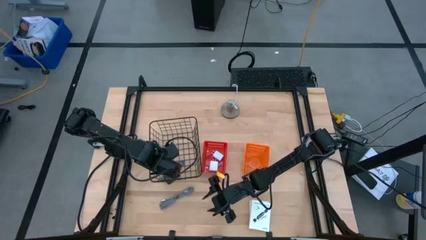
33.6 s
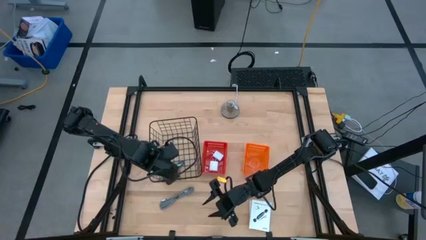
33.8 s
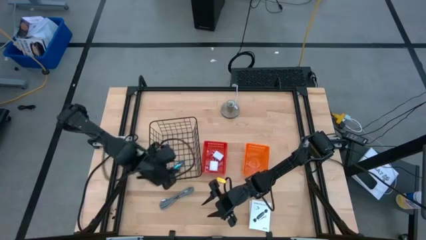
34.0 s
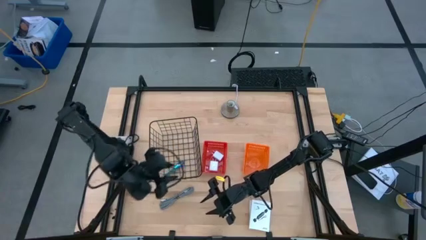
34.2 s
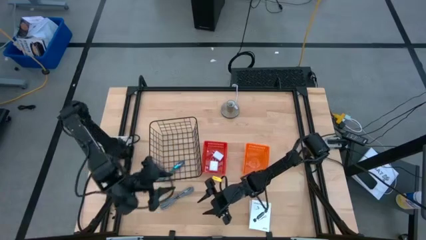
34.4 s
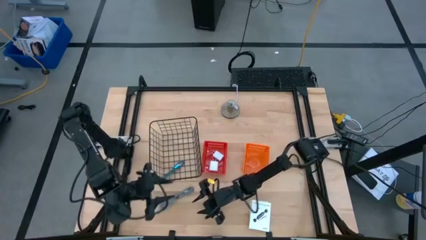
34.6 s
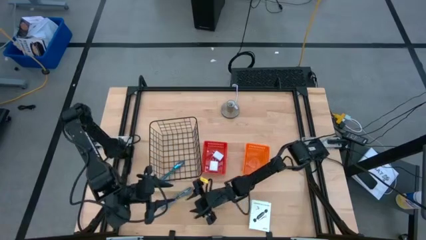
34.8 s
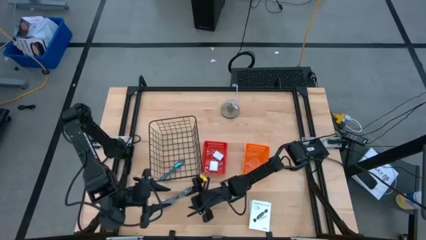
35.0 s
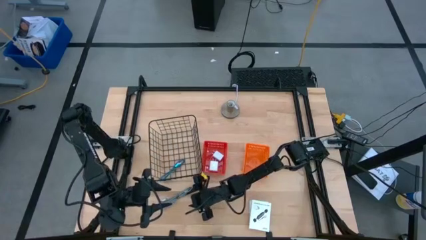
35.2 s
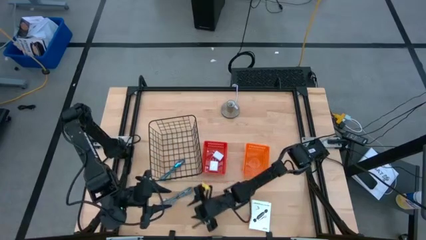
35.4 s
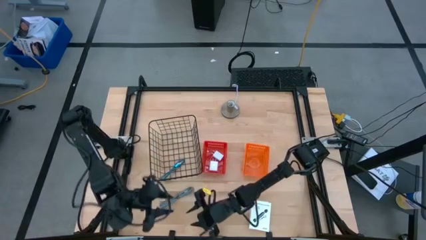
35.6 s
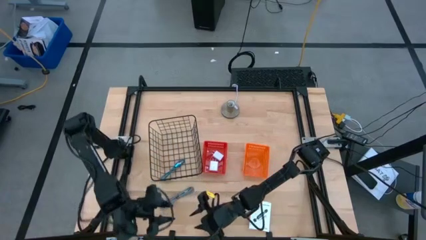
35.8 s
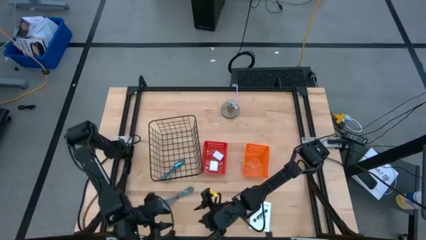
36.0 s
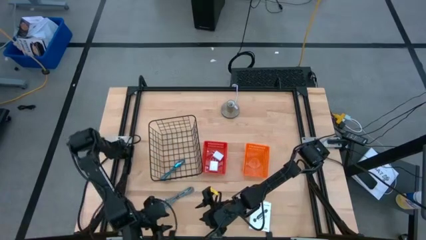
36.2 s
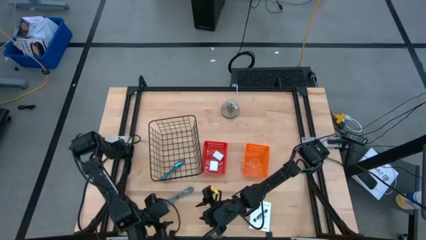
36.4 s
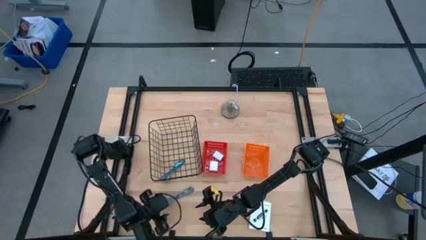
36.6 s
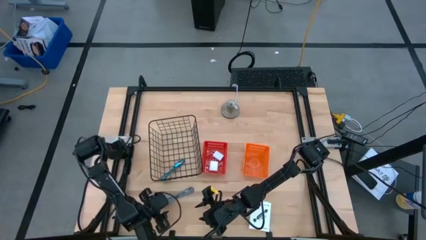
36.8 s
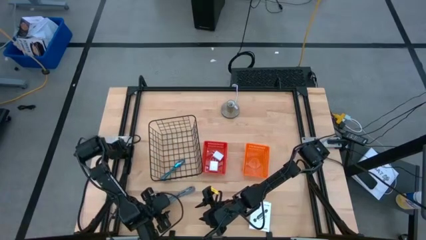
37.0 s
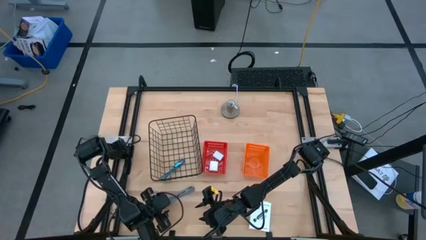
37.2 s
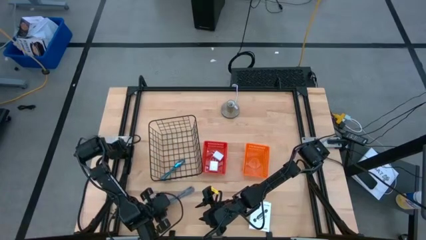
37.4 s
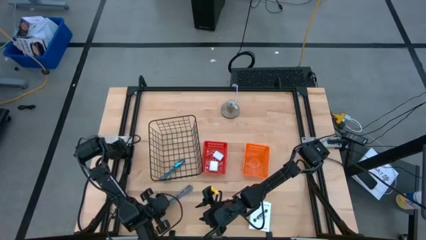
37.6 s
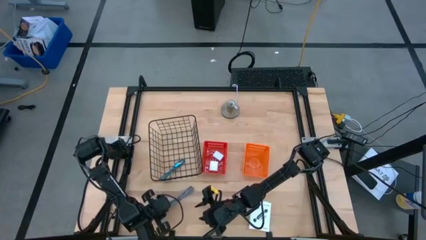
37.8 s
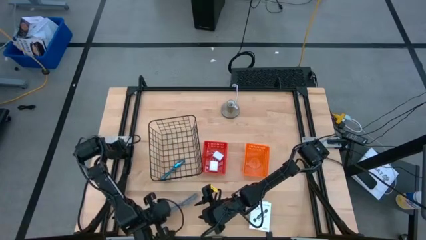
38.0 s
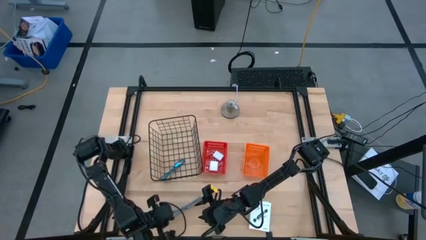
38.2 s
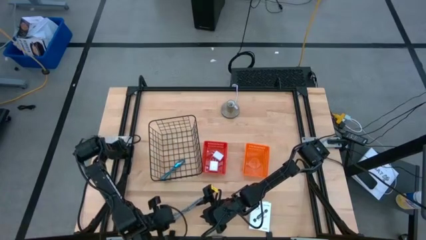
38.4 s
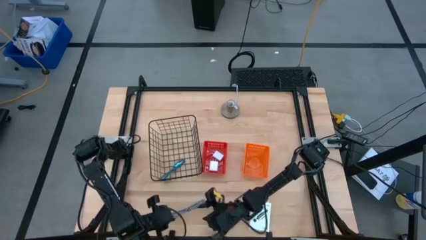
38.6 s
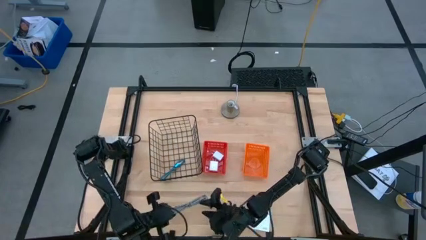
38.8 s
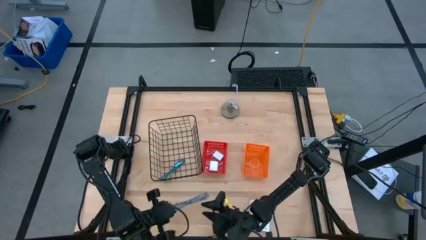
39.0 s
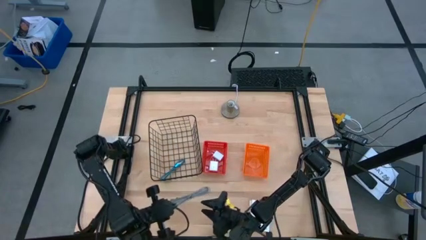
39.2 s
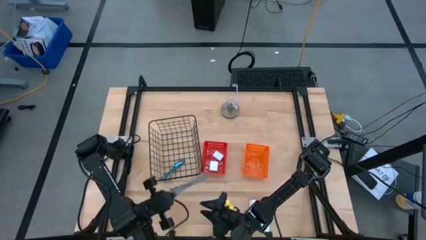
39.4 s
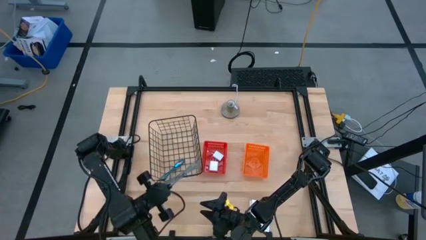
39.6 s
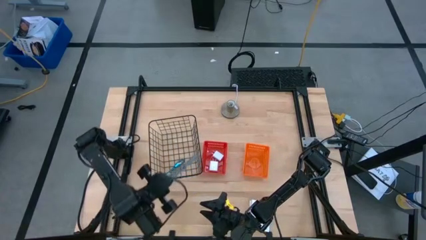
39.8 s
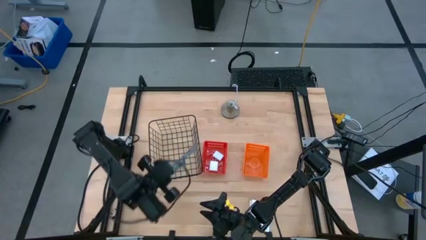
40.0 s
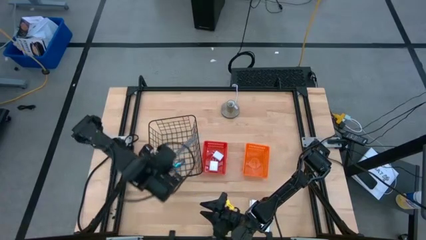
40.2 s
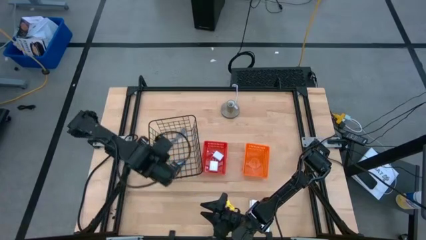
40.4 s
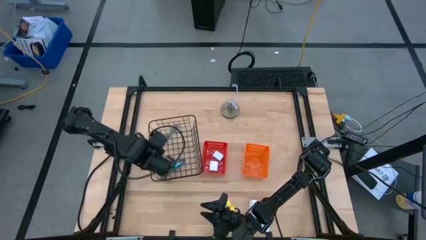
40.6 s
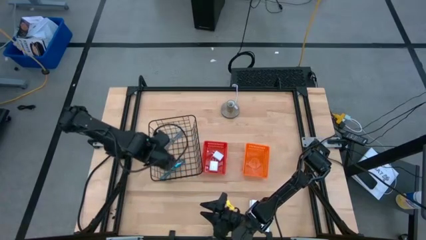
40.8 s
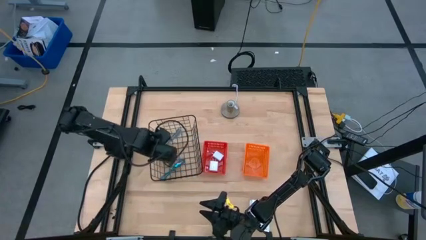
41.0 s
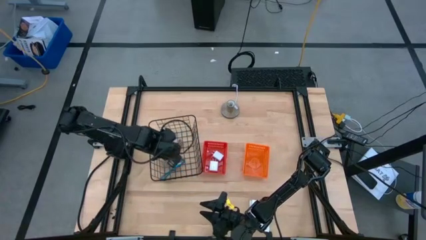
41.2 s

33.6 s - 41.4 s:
Task: Pick and place items into bin
Put the white charger cable into the black wire basket

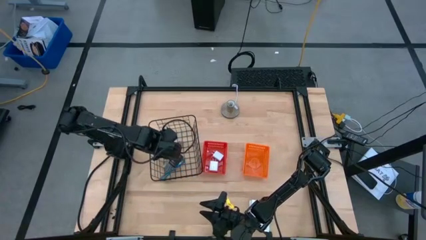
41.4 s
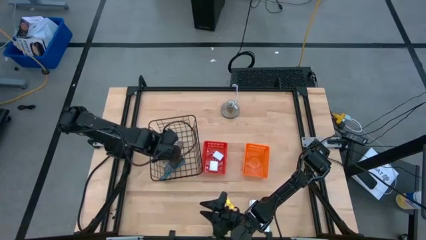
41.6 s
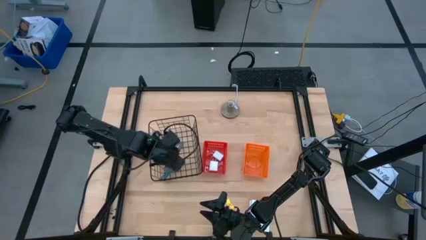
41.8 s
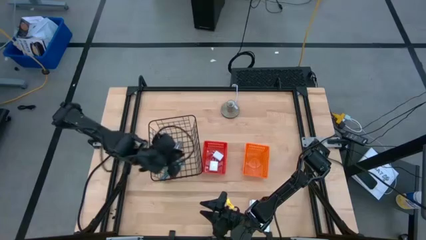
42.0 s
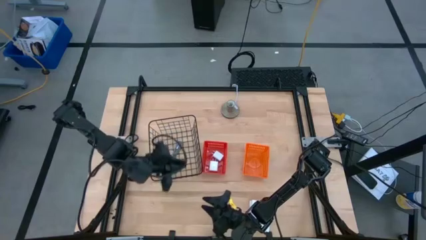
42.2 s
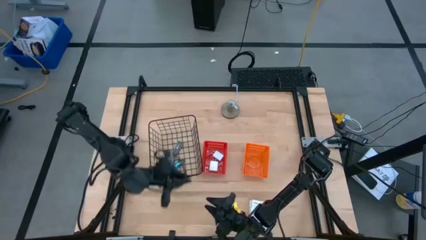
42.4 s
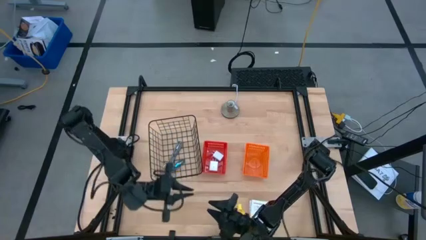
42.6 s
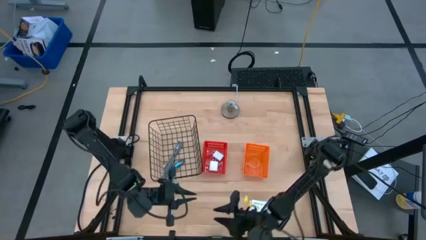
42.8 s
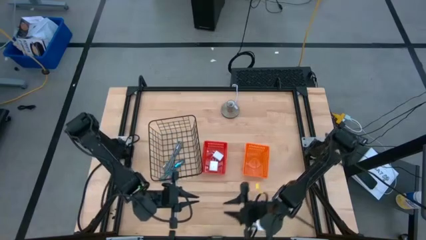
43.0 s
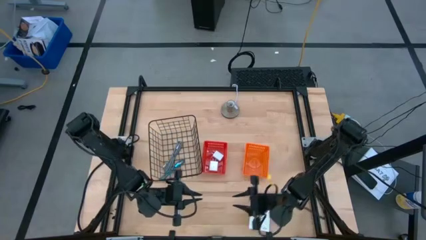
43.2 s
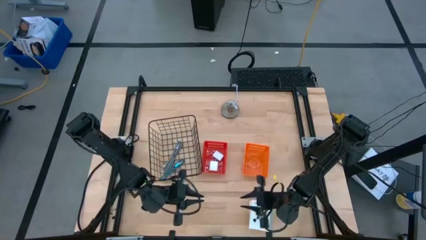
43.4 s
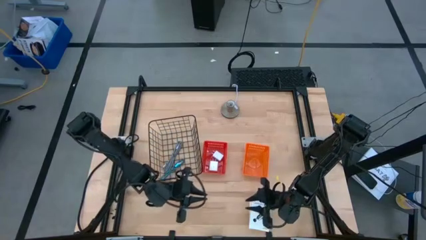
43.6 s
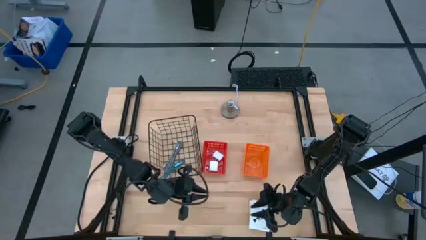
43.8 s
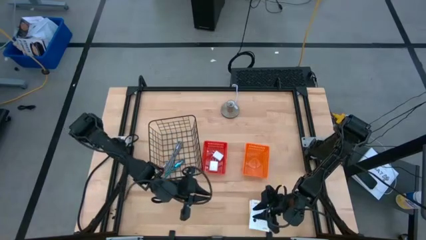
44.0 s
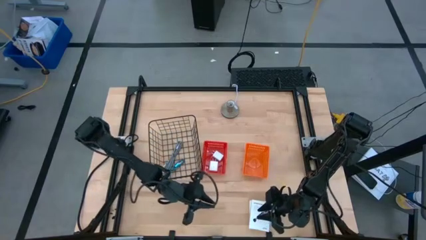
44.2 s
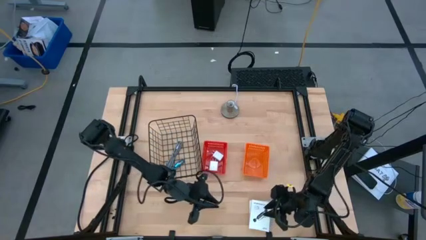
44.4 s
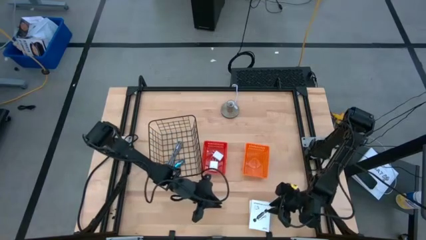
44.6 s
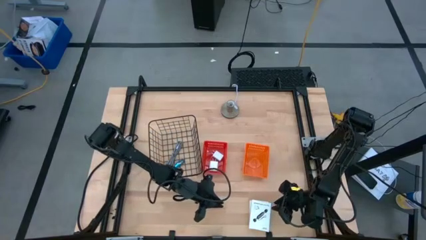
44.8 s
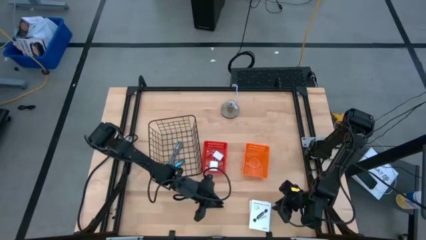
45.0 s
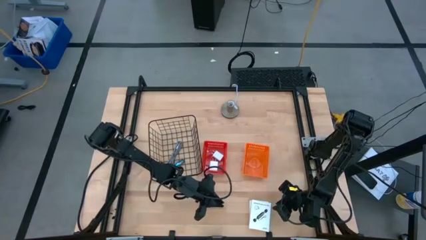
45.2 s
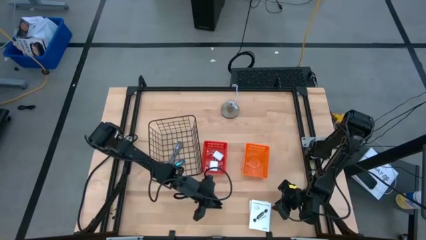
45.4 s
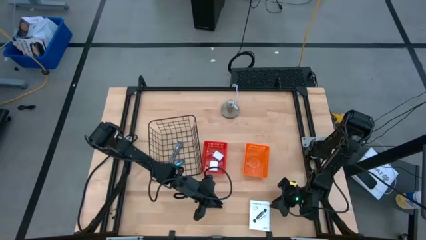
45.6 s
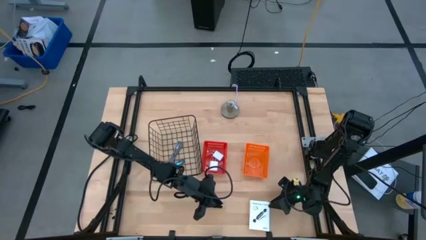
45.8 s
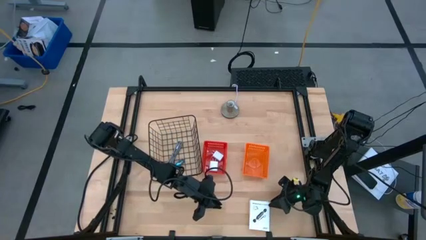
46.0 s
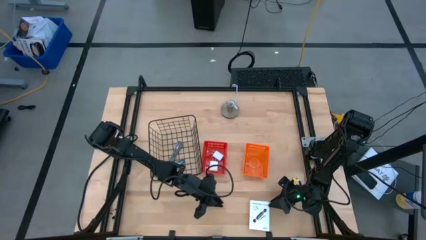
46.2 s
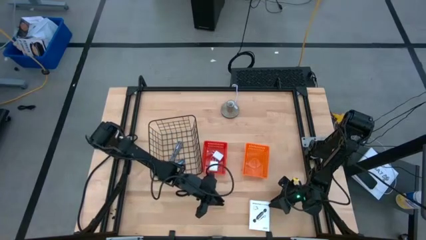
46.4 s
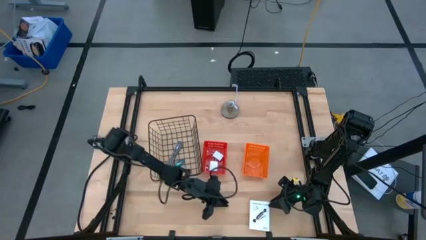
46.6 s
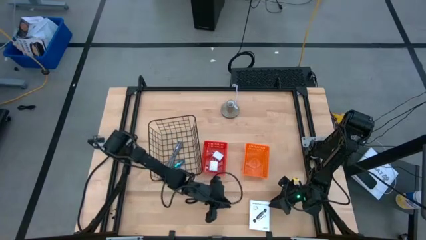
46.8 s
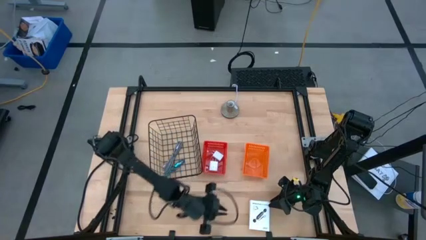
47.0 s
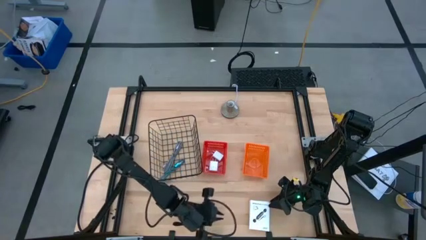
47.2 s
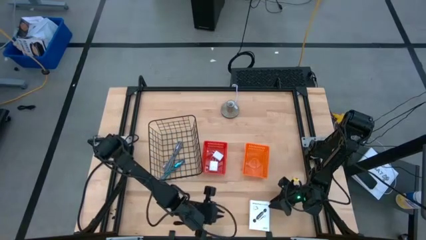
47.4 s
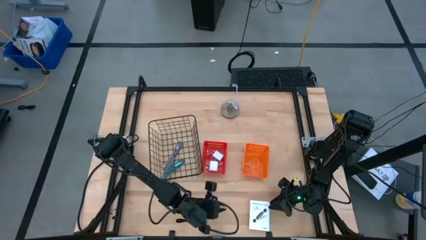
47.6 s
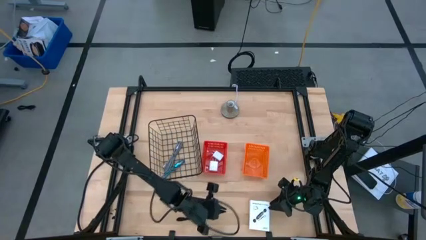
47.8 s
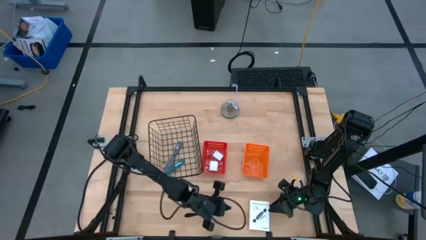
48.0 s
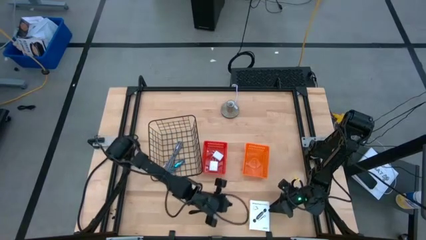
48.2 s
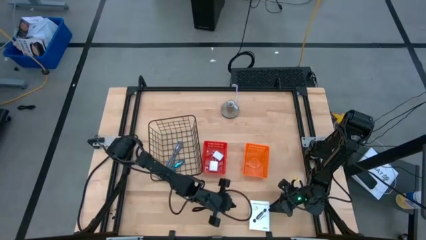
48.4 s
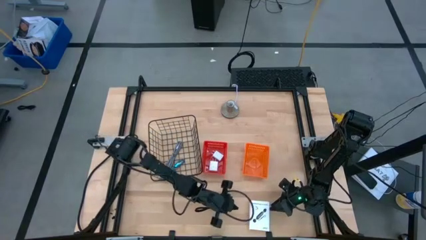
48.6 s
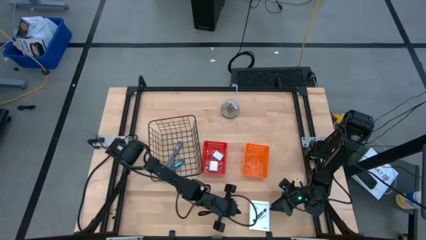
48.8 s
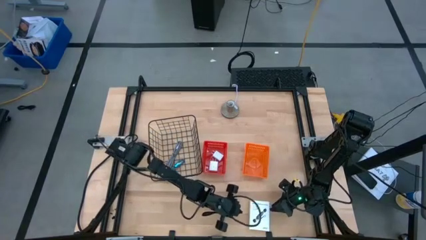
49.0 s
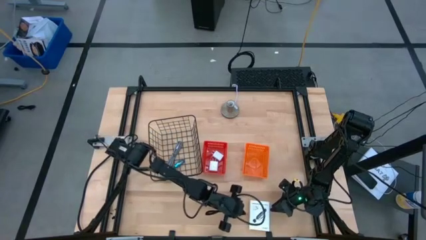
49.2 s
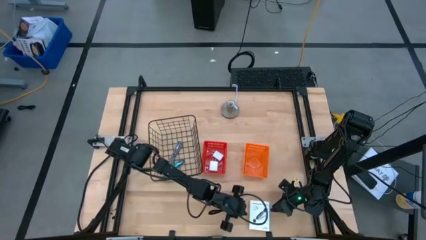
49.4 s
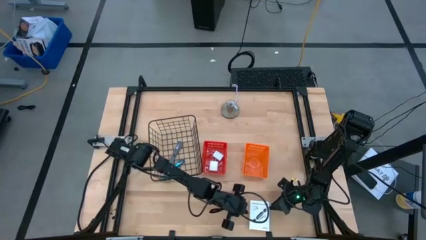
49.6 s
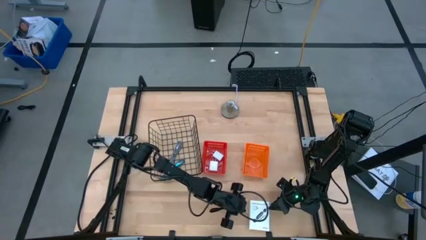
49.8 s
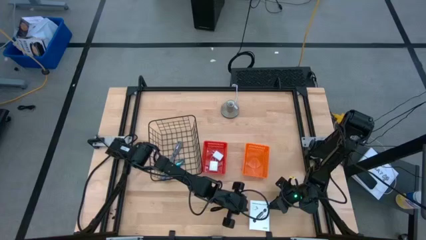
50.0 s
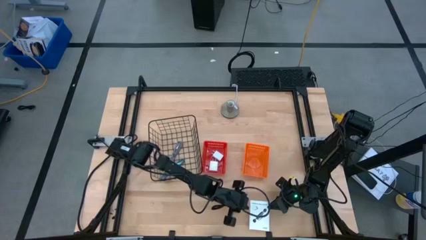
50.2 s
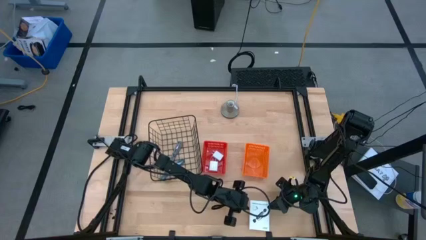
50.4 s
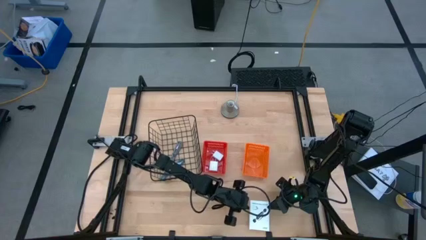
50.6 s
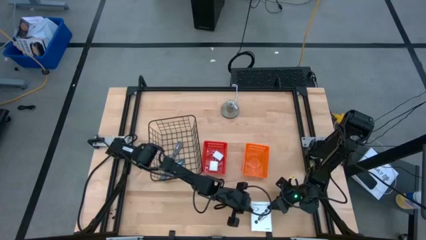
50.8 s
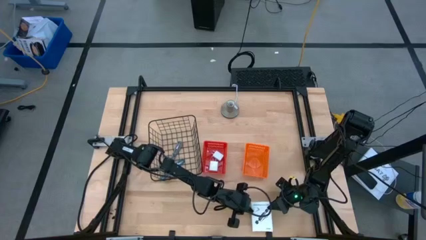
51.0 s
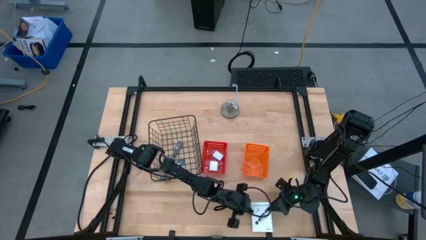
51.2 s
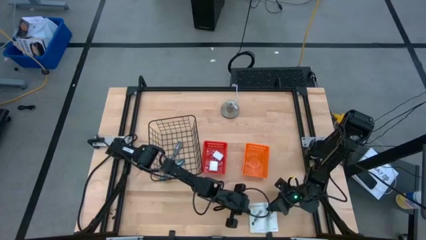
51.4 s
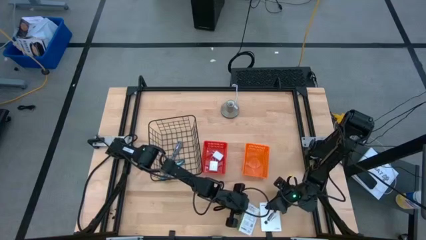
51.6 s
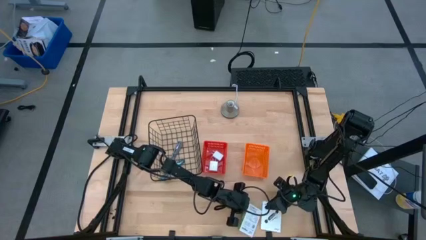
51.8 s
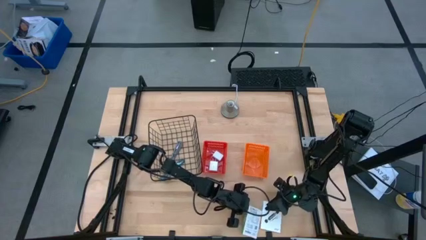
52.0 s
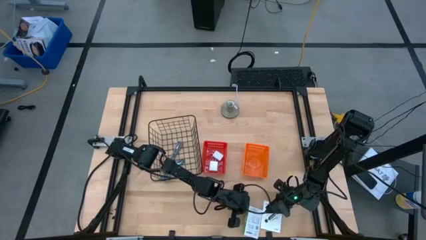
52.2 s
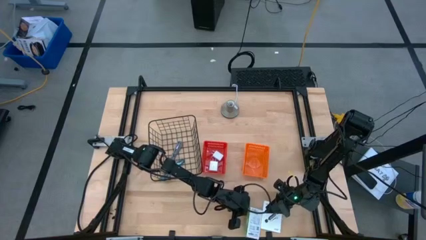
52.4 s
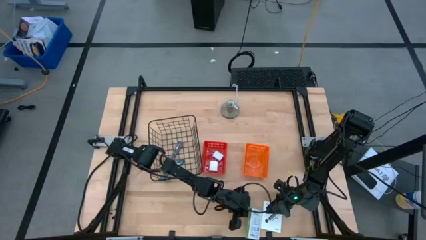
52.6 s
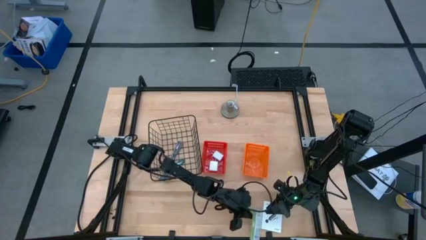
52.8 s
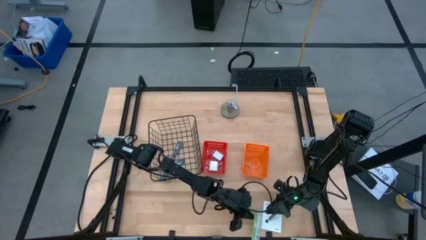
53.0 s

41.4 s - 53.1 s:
Put the white card reader box into the orange basket
